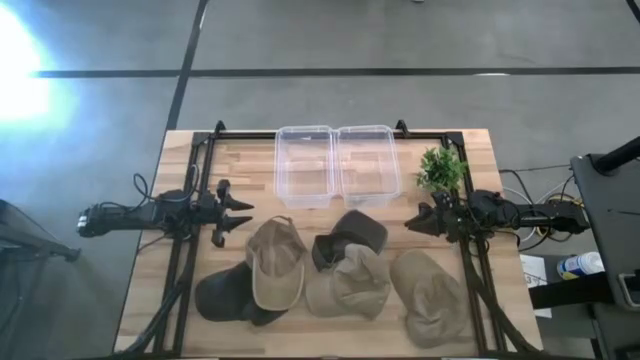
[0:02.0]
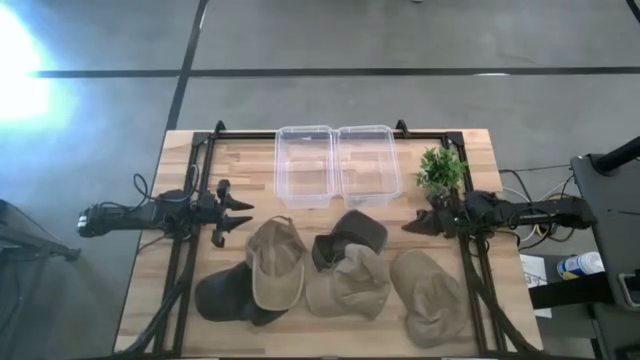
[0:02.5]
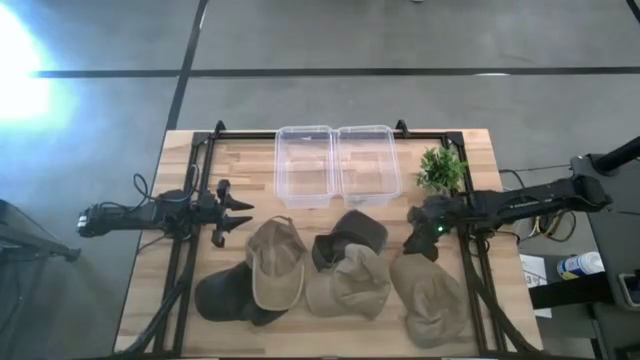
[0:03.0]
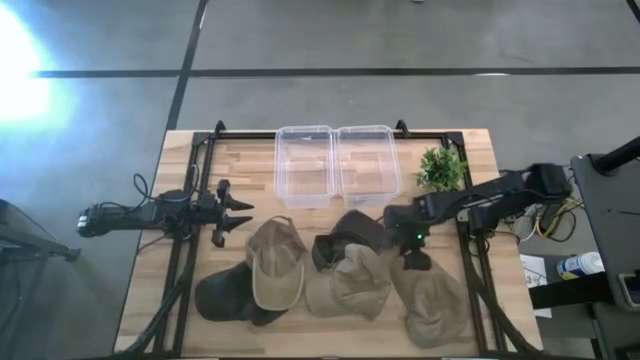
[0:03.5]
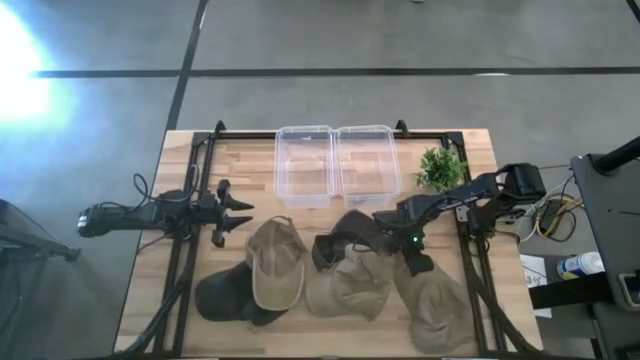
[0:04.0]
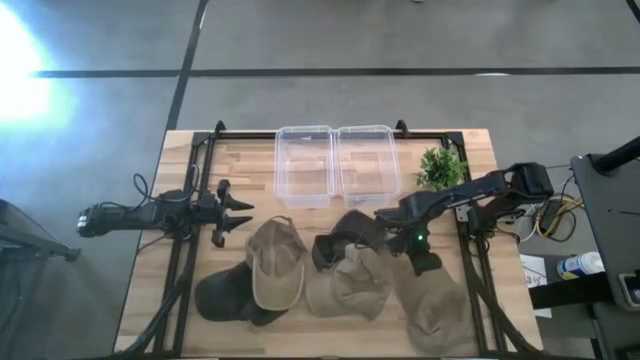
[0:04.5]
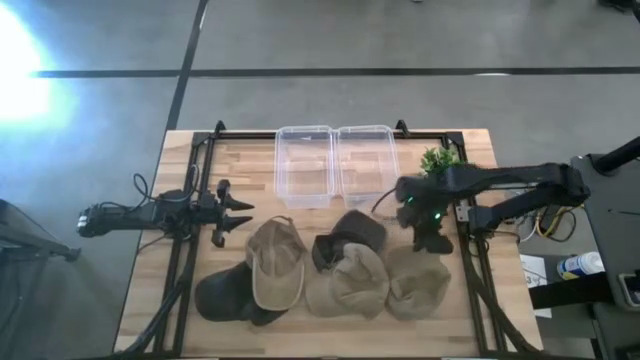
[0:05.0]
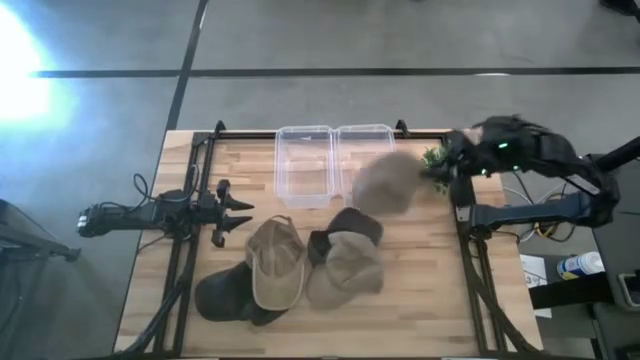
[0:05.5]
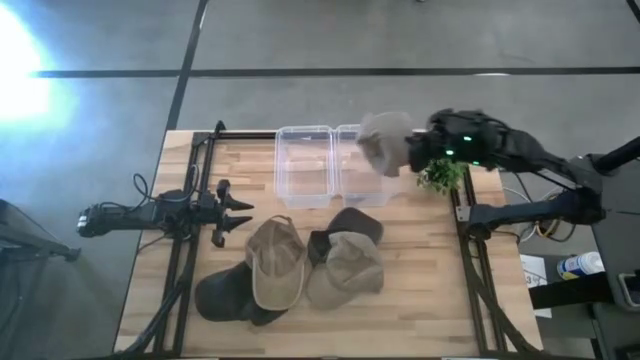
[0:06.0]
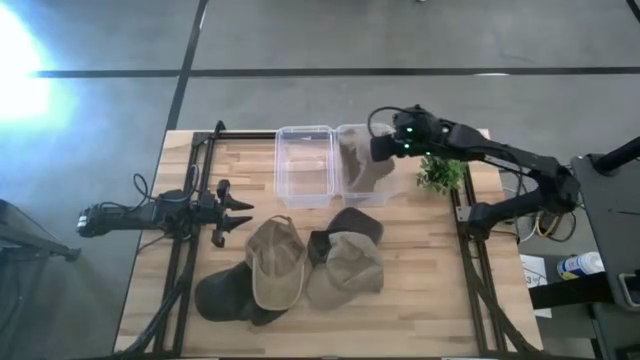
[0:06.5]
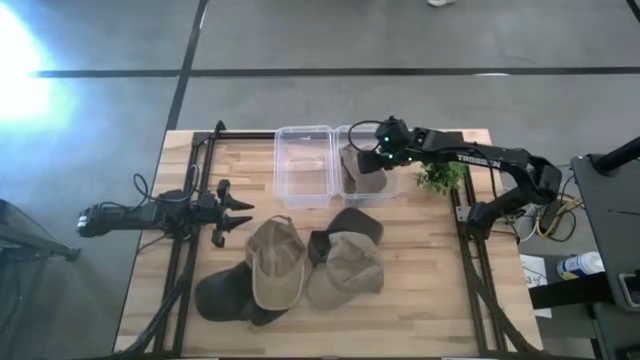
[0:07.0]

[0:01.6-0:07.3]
Task: Pick & Place hat
Put the right brown cap into the right transparent bin

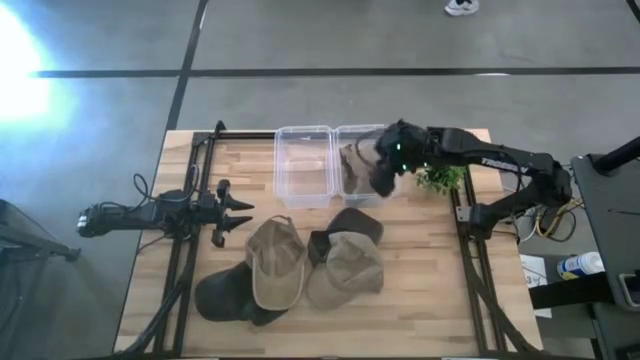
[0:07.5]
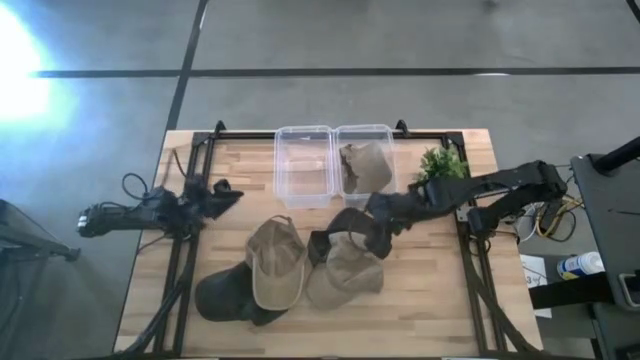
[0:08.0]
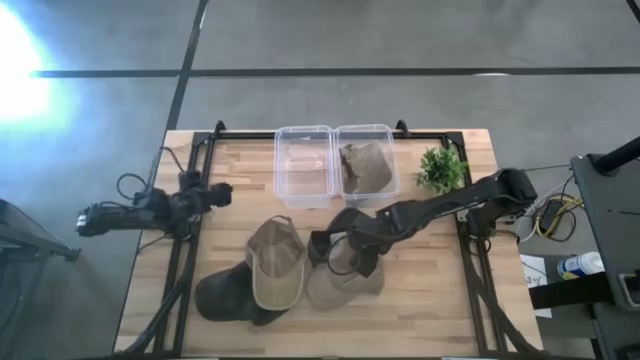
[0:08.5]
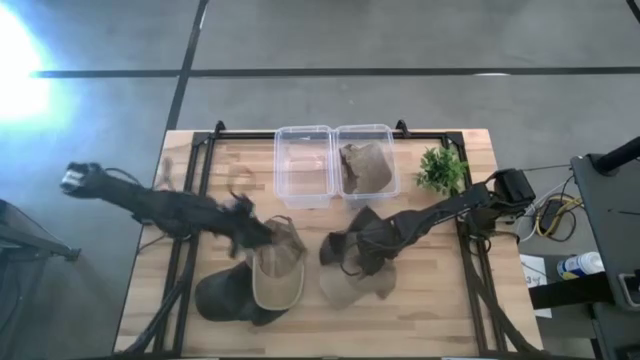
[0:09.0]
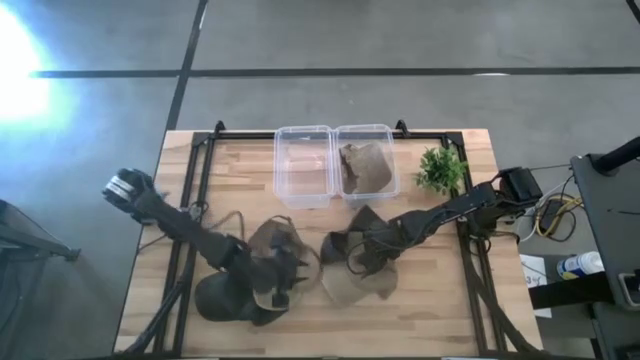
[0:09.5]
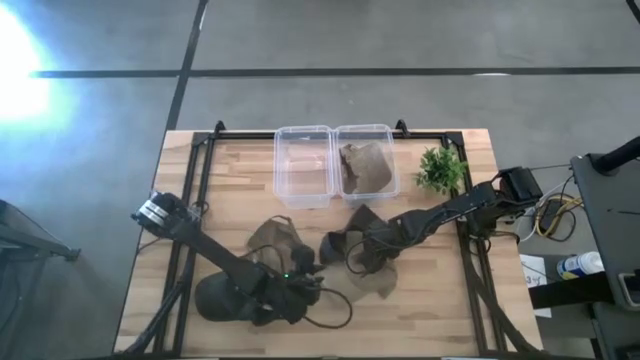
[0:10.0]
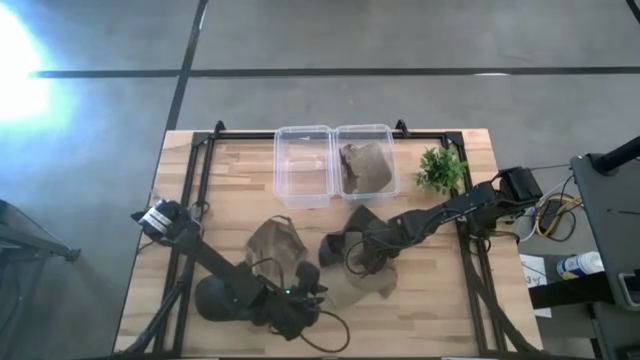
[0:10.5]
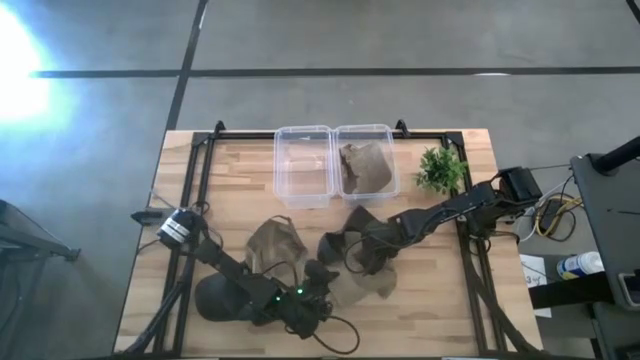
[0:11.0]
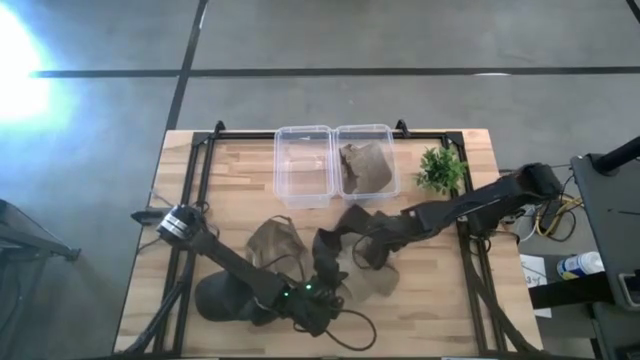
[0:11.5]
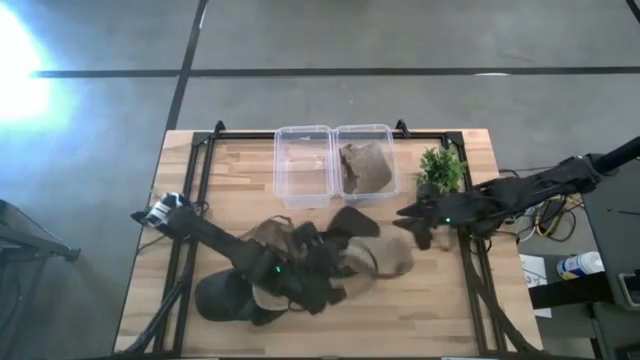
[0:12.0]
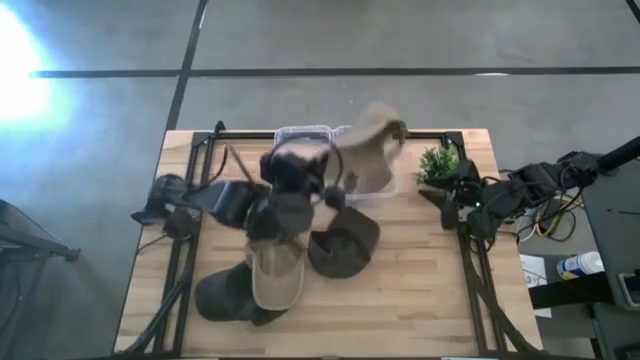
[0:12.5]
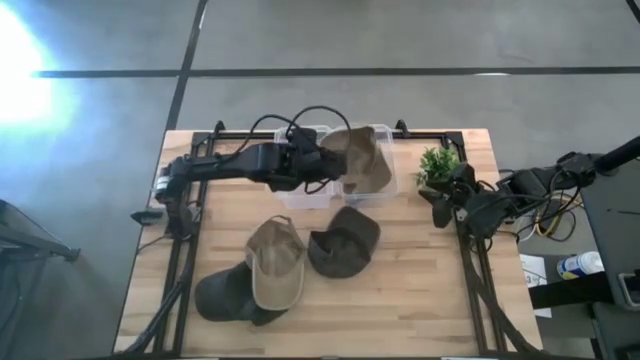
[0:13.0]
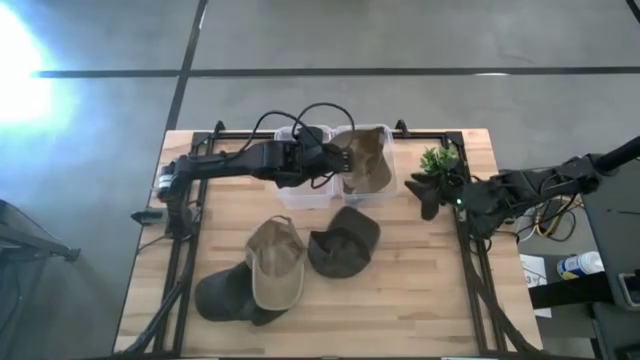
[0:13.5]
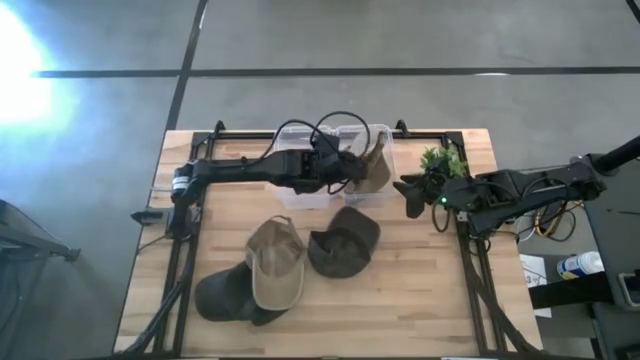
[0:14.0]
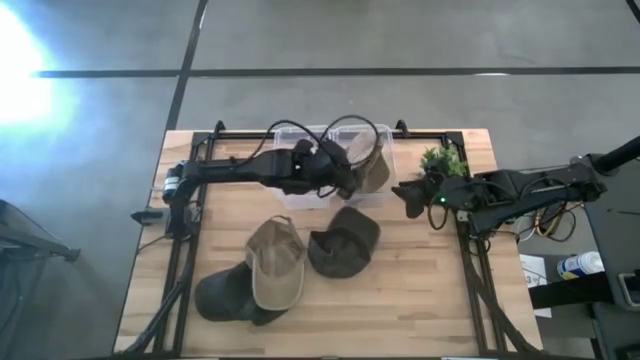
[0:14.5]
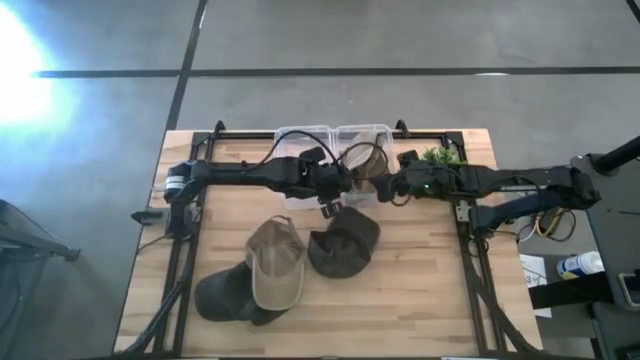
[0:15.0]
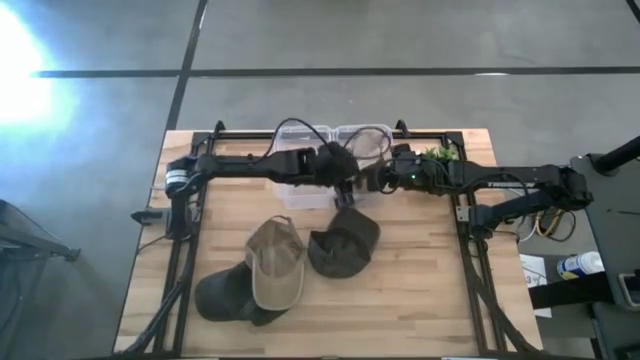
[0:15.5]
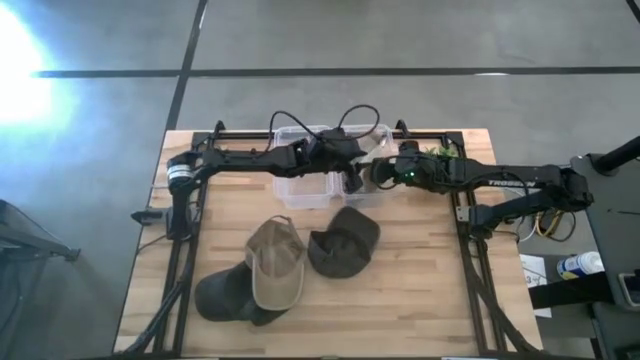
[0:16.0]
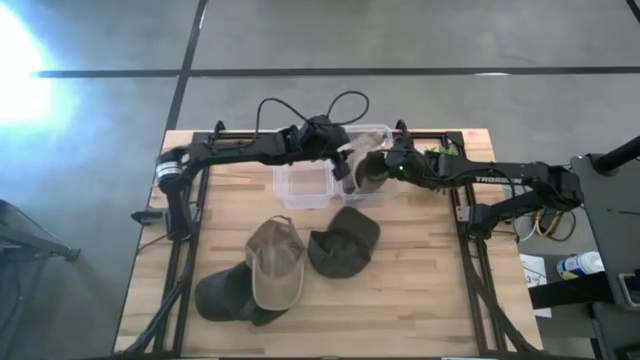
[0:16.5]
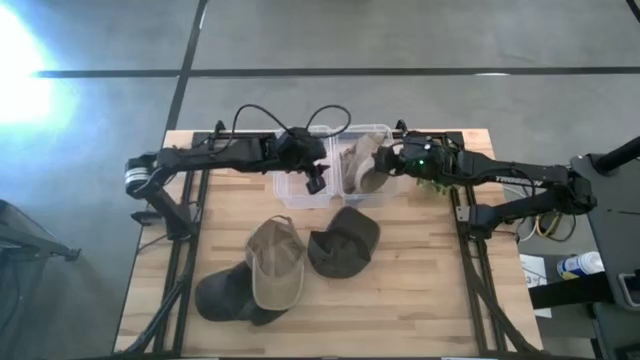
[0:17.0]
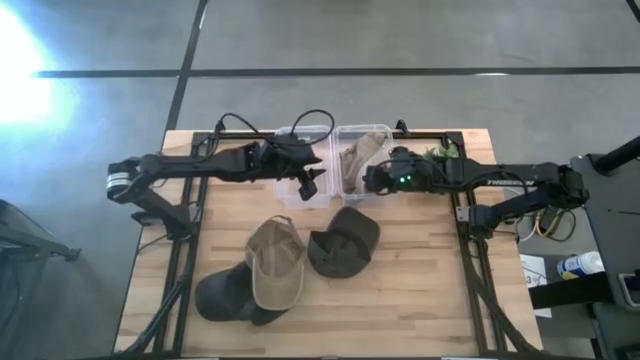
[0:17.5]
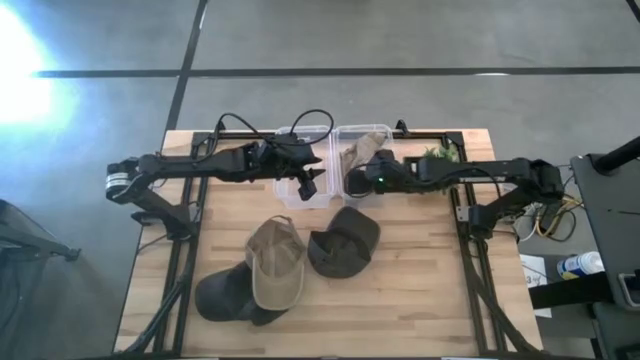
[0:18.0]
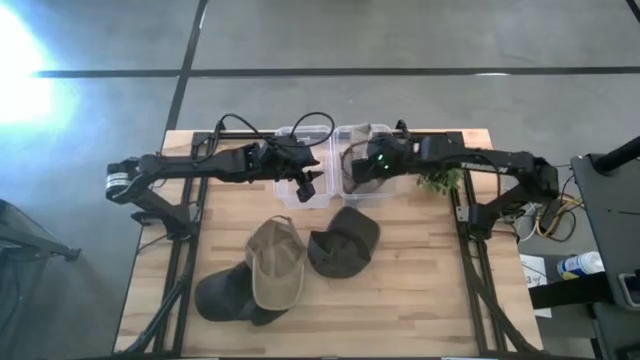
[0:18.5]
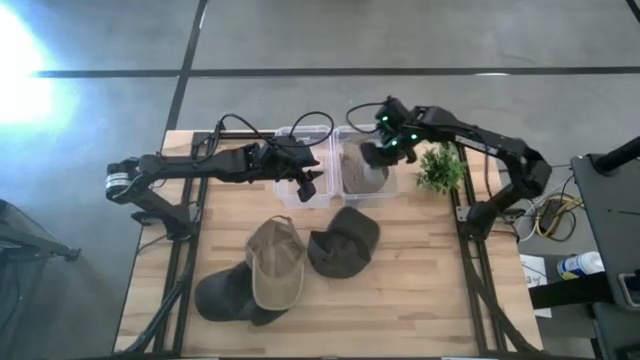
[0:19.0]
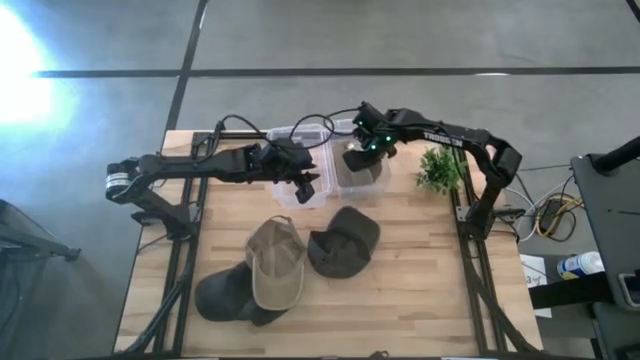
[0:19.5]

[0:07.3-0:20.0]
Put the right brown cap into the right transparent bin

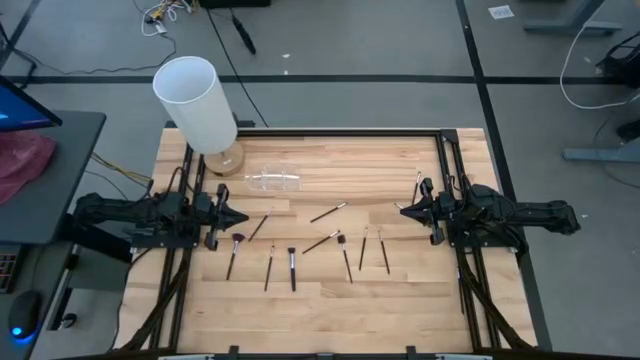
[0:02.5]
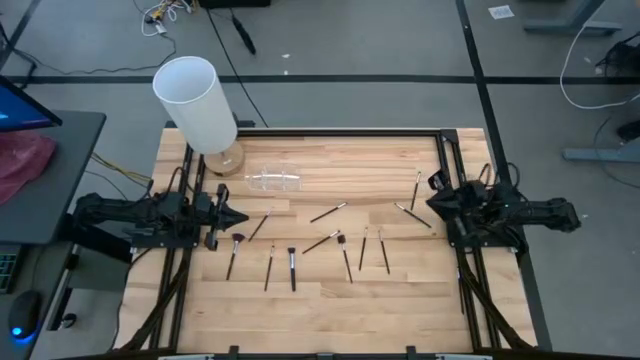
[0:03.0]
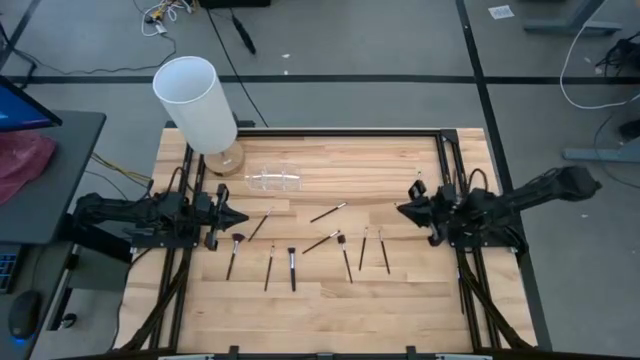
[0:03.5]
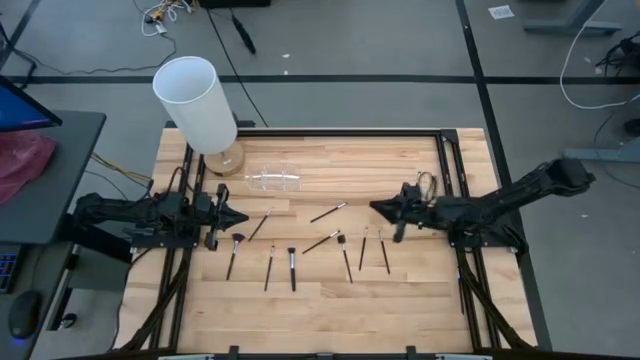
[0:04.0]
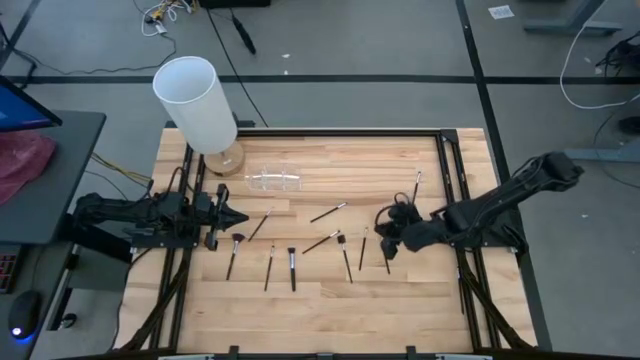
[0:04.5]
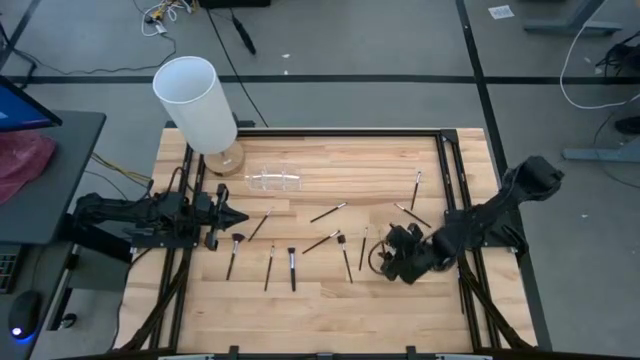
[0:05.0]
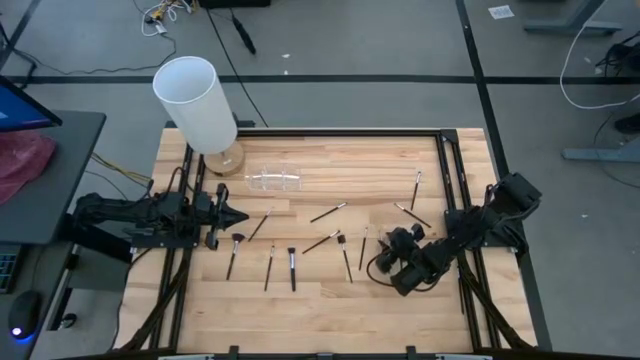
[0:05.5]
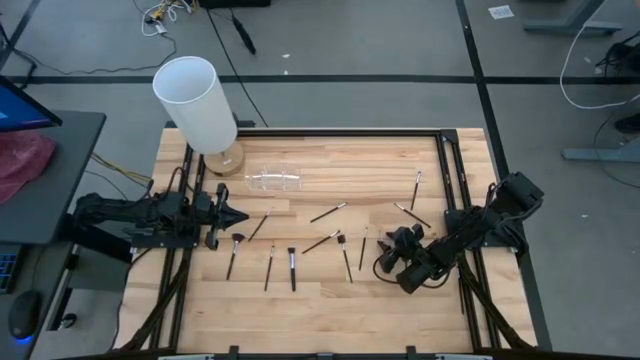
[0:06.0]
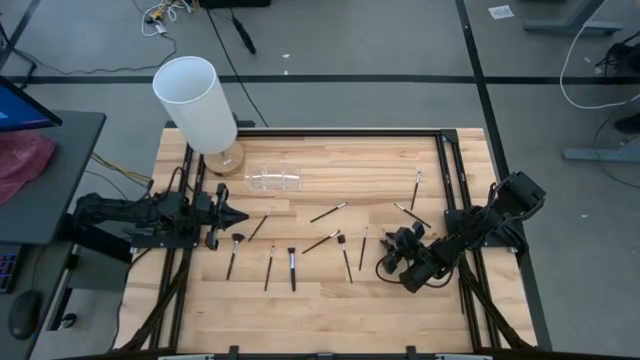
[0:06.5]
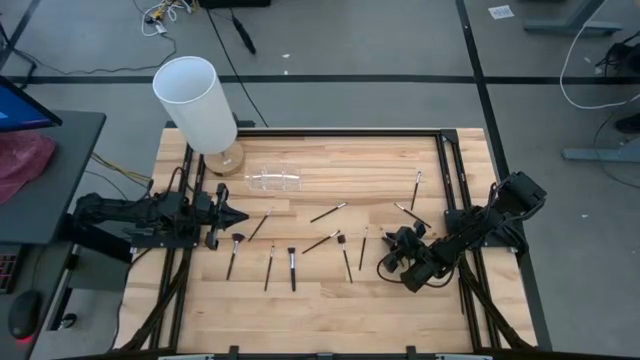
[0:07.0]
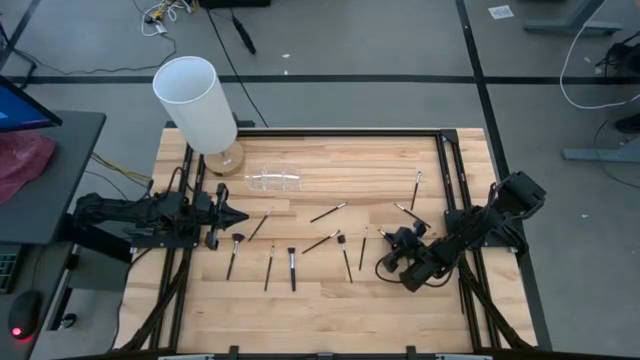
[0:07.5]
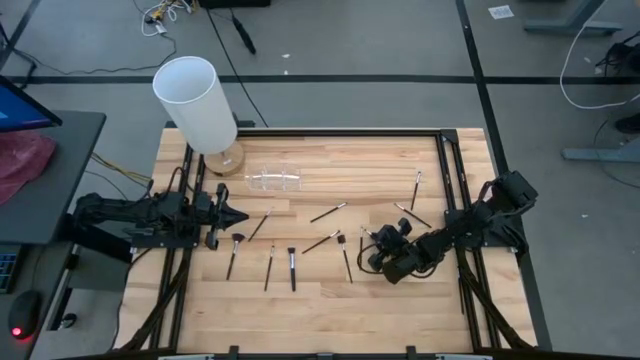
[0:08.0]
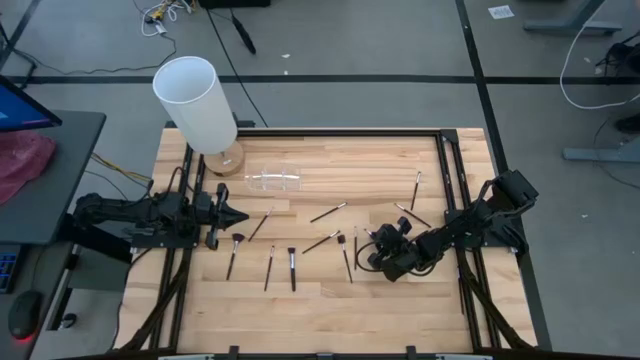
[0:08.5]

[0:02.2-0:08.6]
Task: Put items in baskets/containers
Put the eyeshadow brush into the transparent organizer
